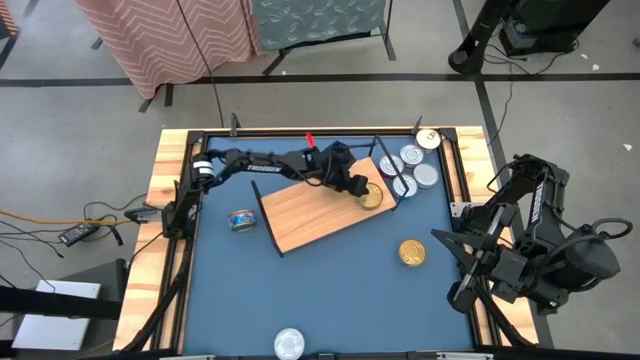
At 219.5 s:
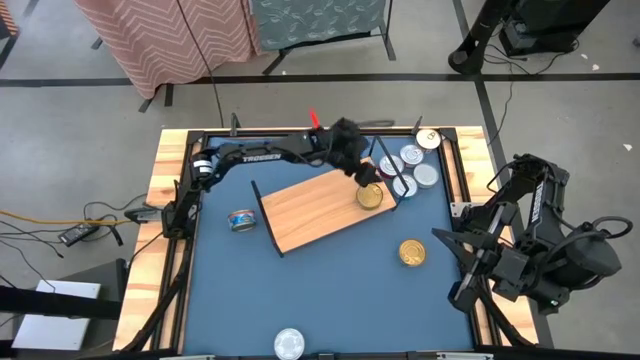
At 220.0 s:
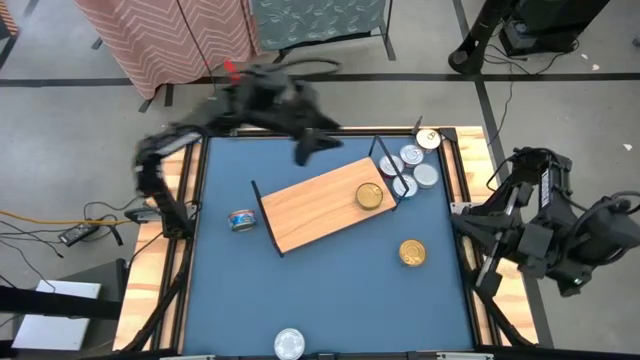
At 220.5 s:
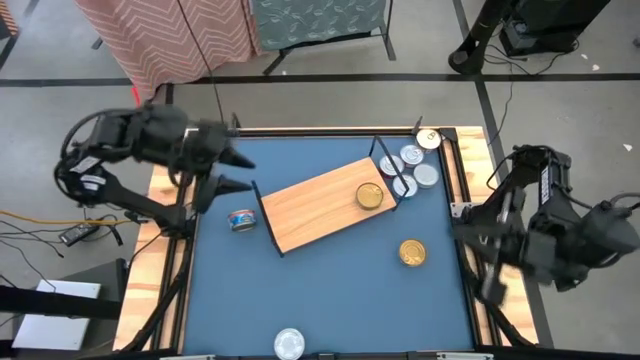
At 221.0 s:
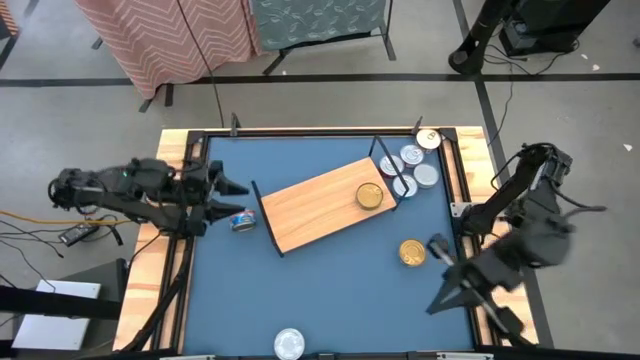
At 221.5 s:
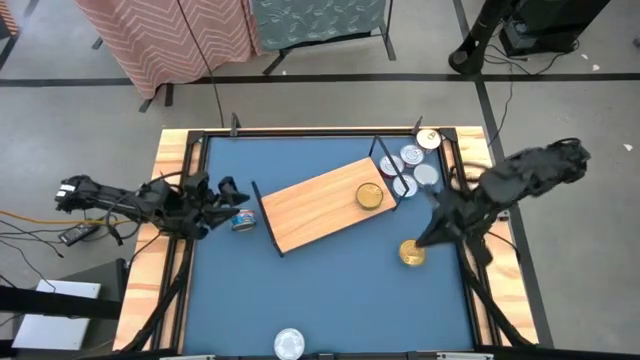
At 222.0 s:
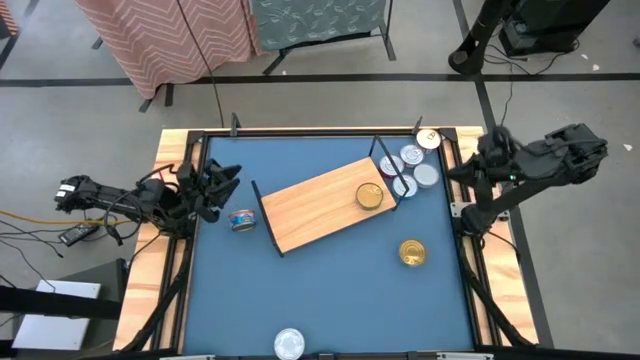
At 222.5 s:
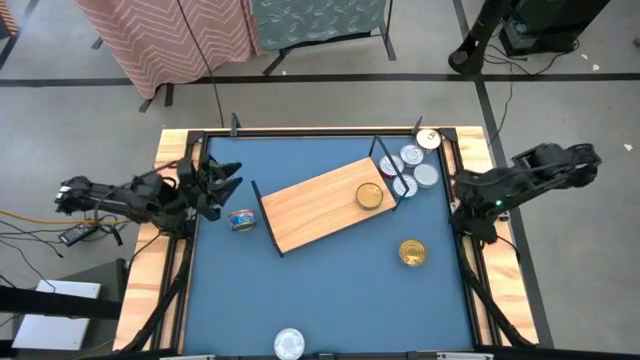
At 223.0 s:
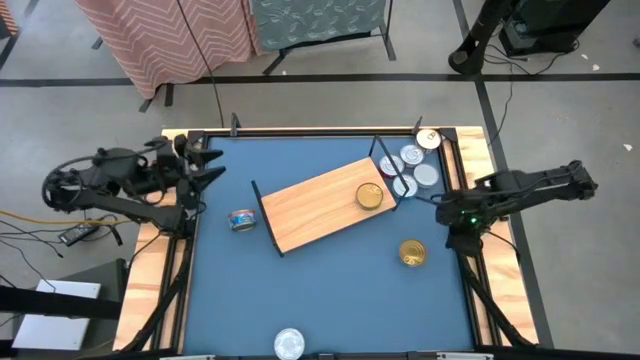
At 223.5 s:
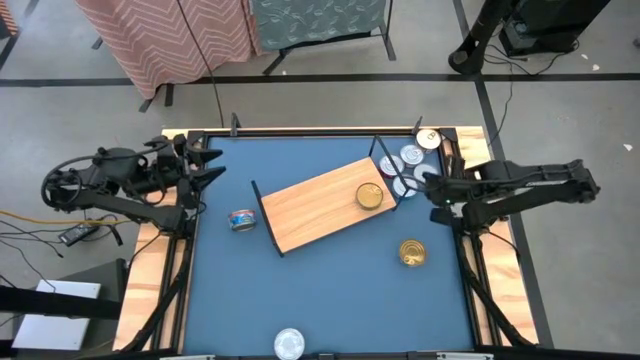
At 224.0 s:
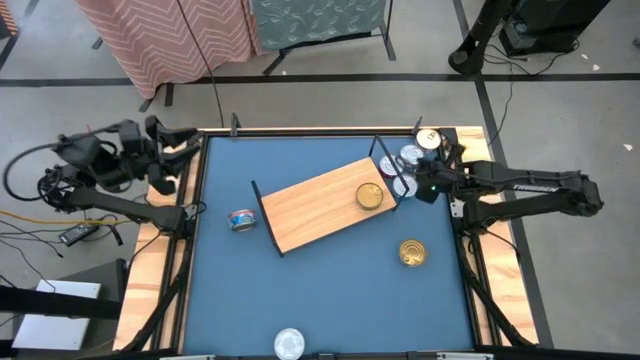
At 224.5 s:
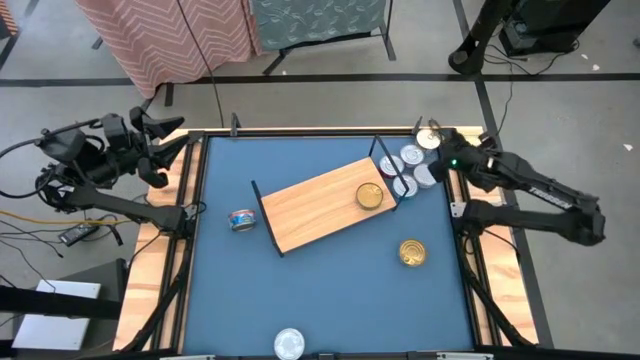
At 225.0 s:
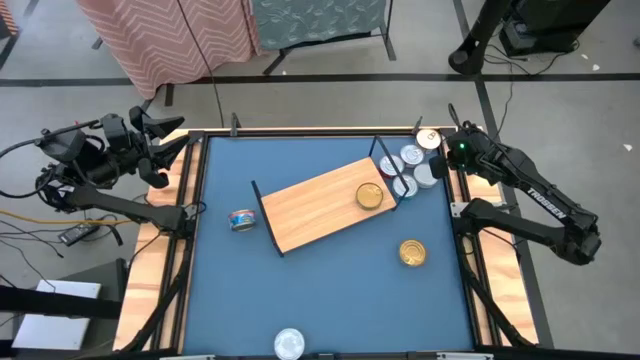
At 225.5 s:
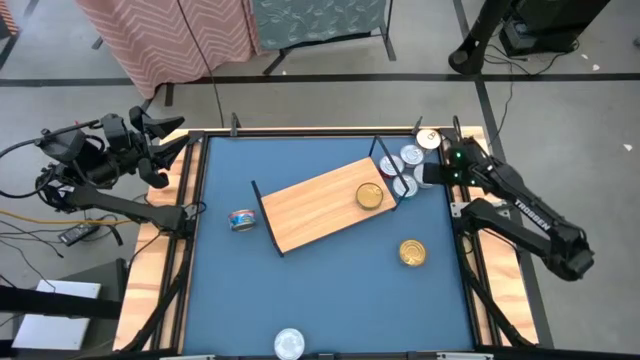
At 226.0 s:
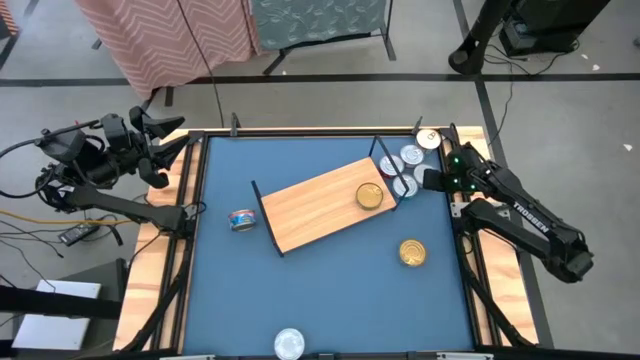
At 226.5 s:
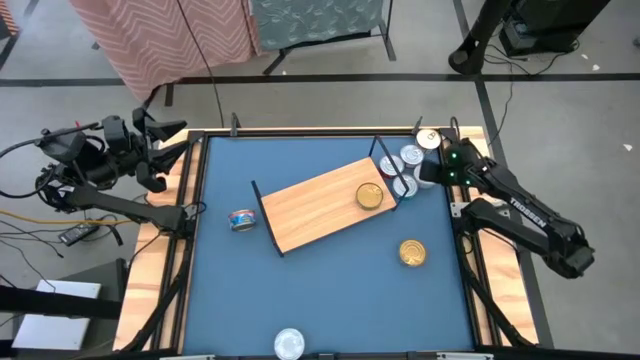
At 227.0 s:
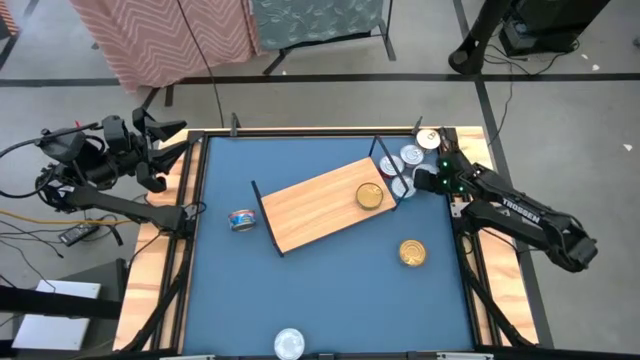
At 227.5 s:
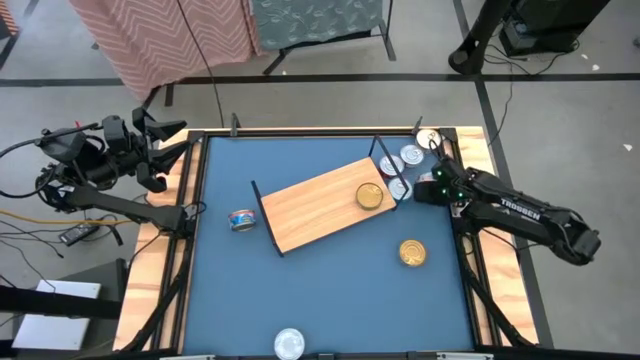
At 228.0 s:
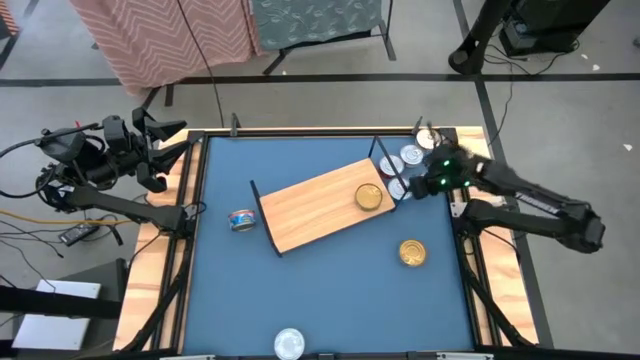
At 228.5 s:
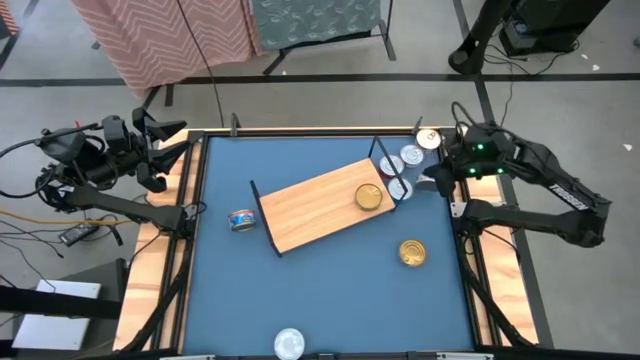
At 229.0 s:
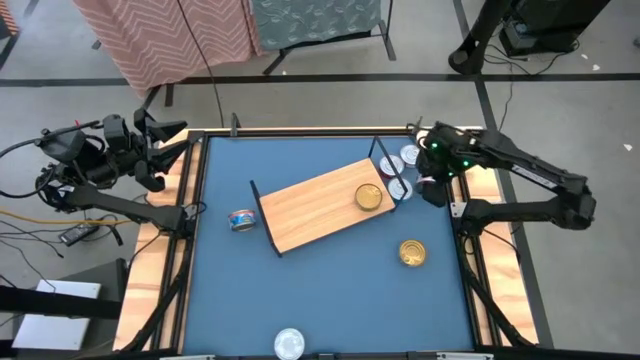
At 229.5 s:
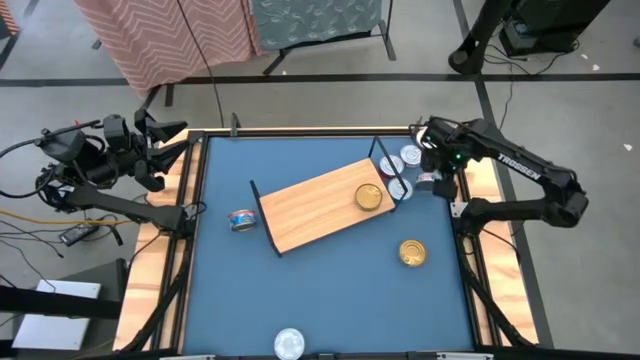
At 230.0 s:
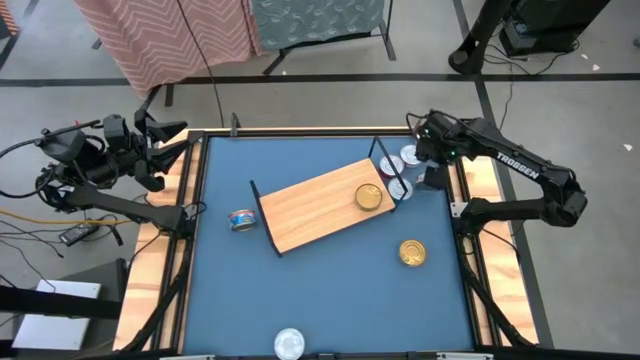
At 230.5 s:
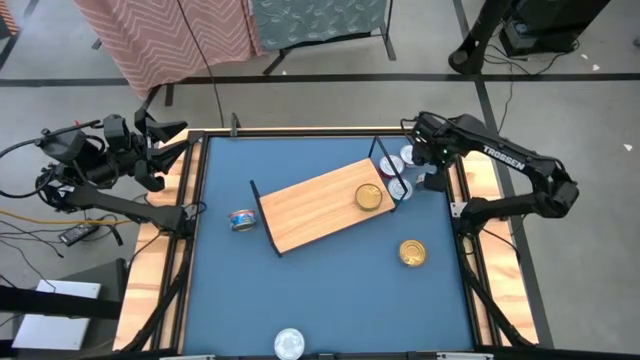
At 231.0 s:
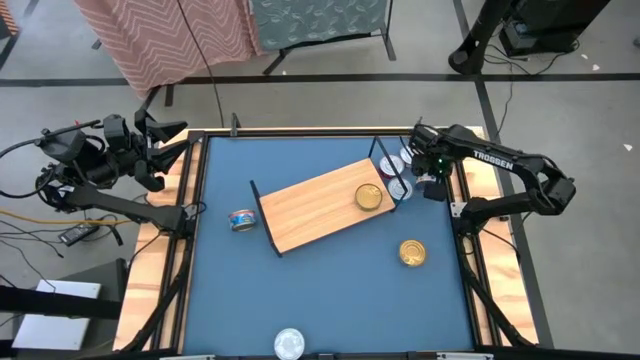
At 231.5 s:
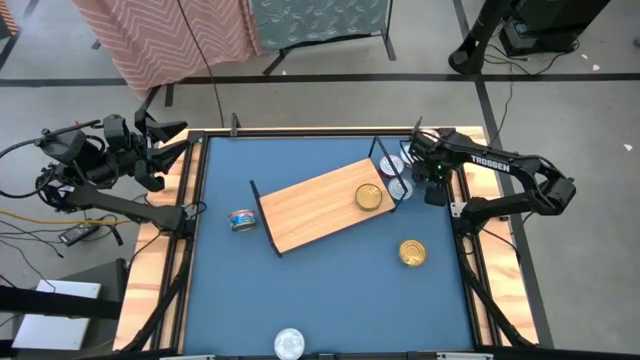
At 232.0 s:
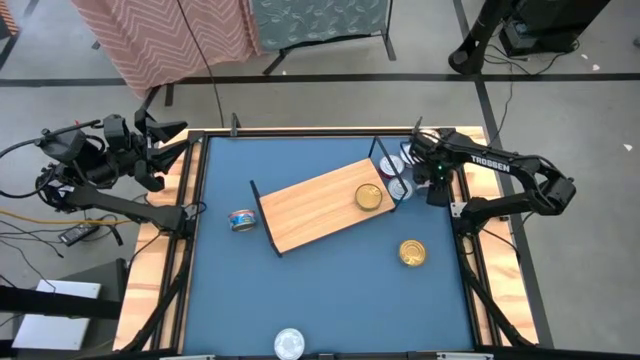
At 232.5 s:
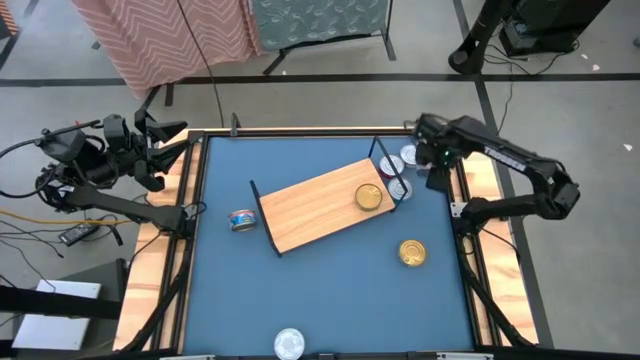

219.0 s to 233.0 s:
Task: Stack canned seafood by type on shelf
Put the green tuna can on the shelf

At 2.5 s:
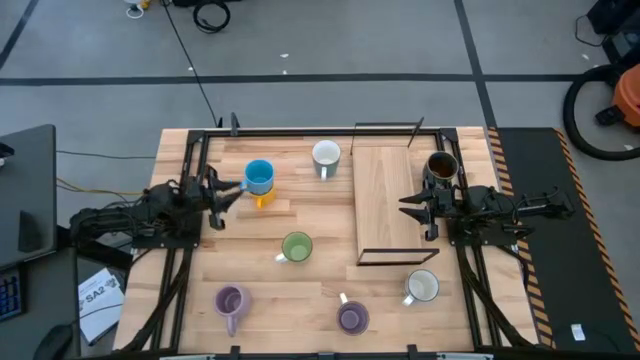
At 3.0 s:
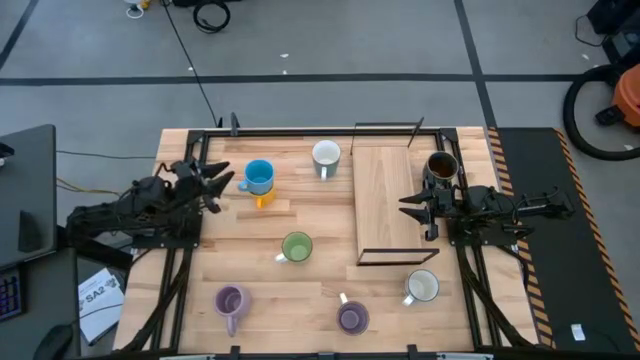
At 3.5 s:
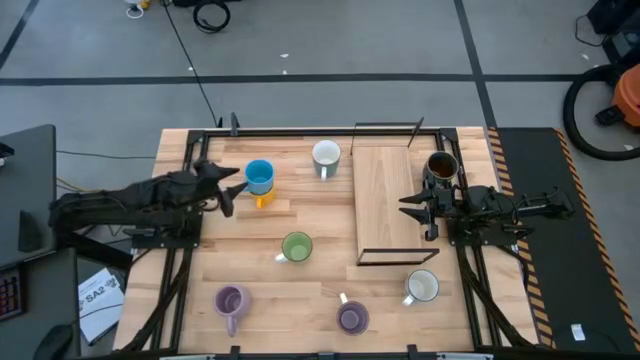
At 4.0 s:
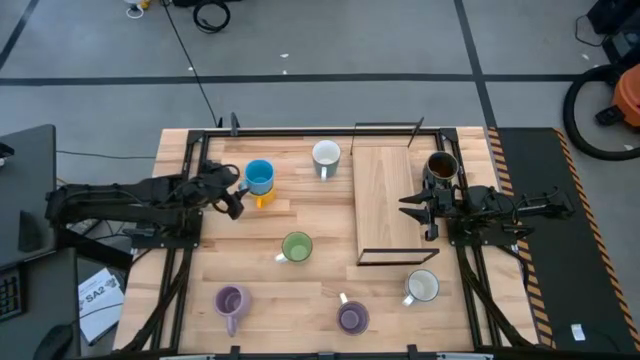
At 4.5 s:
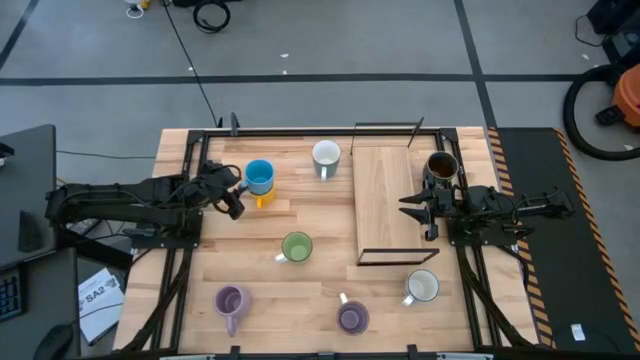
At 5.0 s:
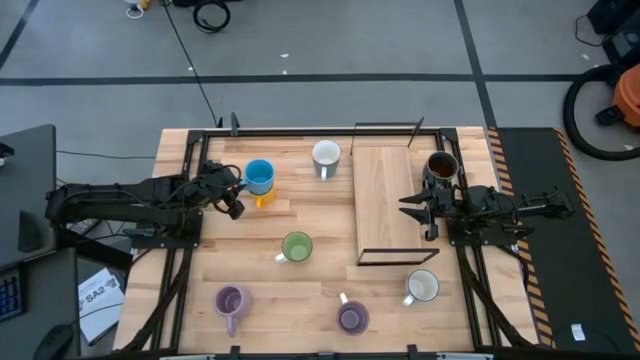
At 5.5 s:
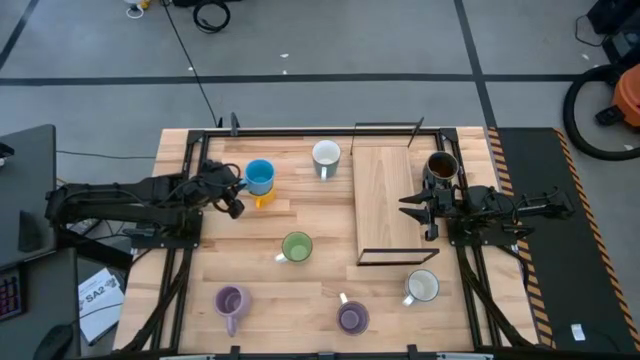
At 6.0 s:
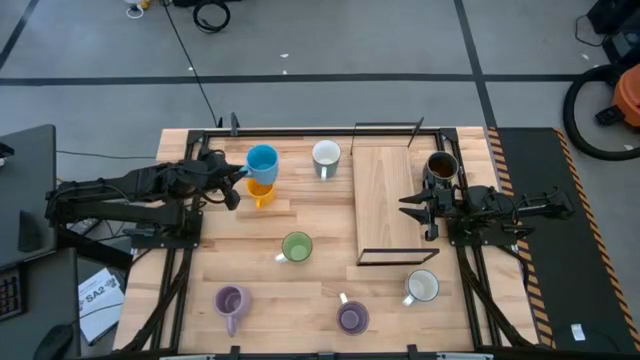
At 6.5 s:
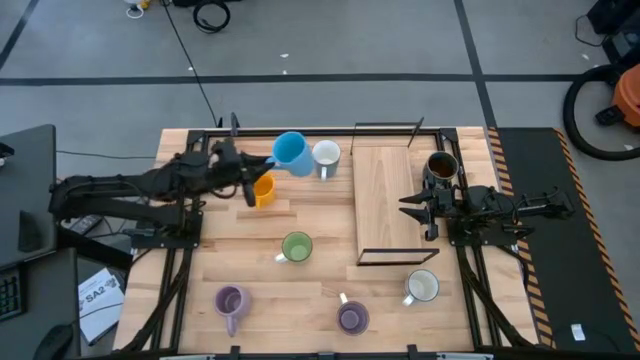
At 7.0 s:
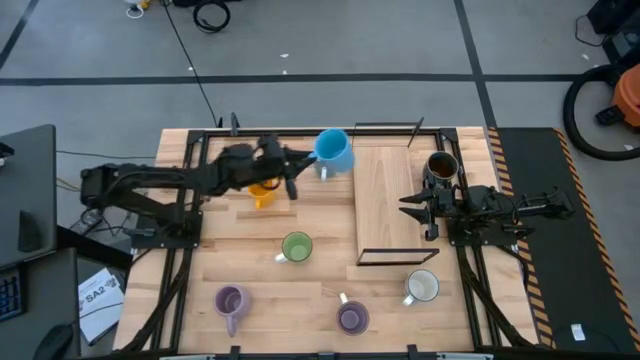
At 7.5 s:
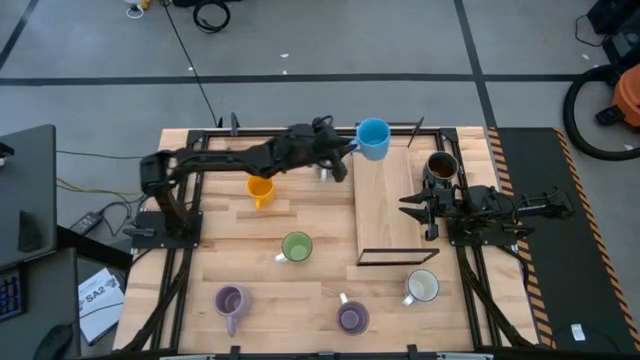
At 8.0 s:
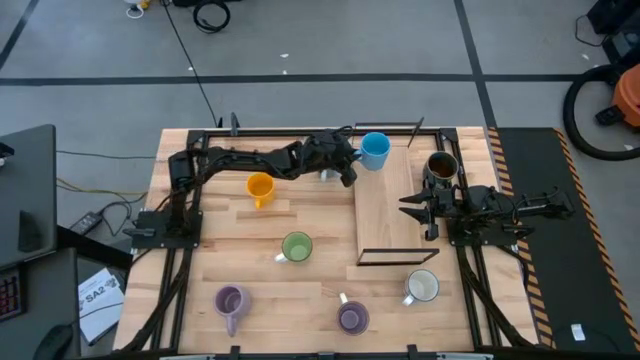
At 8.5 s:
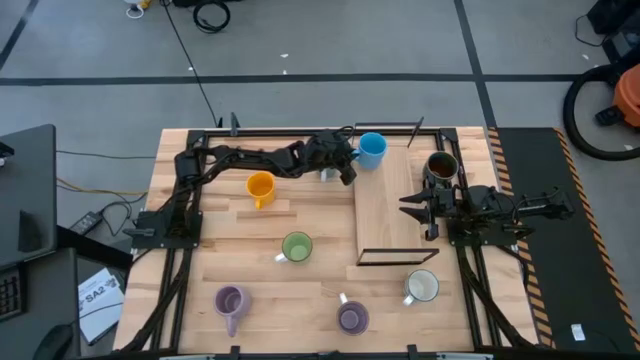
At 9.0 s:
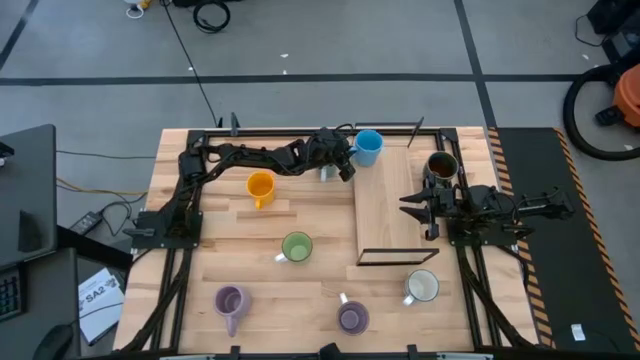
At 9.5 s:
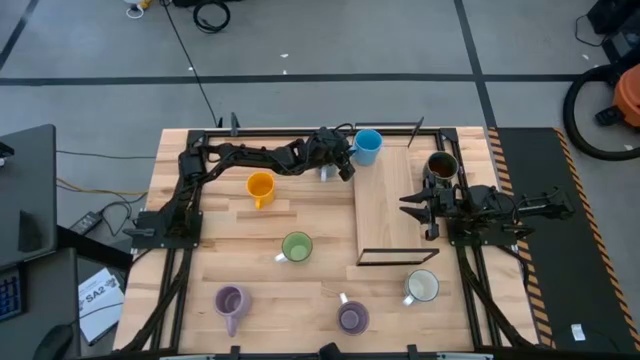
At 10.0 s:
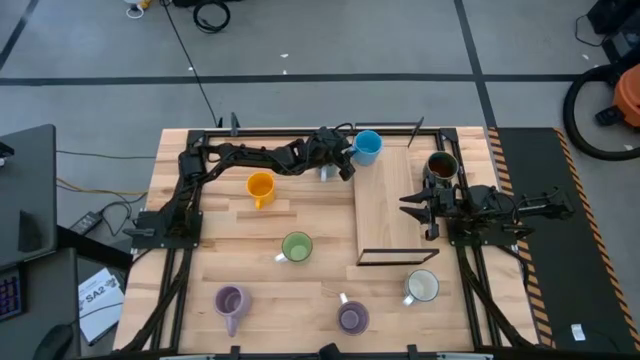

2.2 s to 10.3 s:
Task: Place coffee mugs
Put the light blue mug on the shelf
